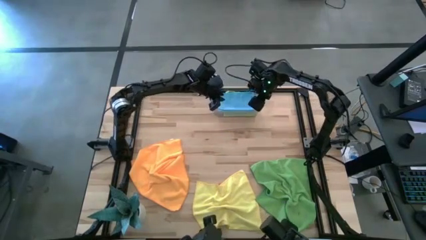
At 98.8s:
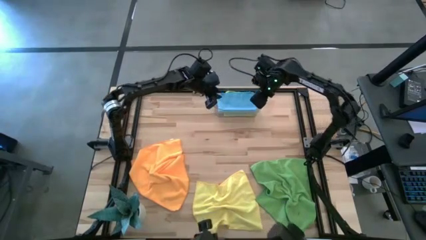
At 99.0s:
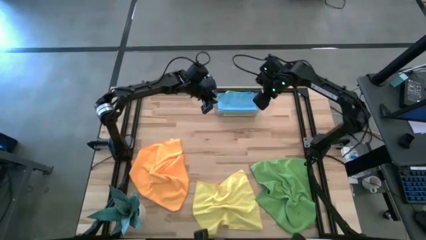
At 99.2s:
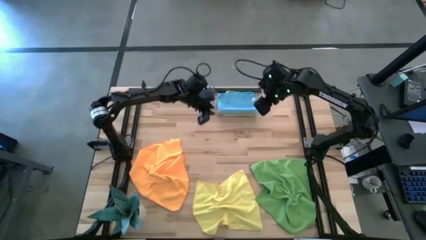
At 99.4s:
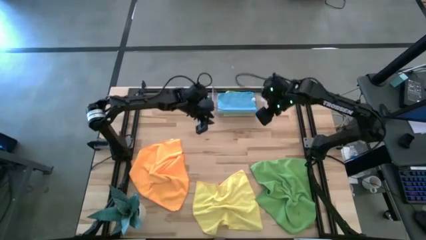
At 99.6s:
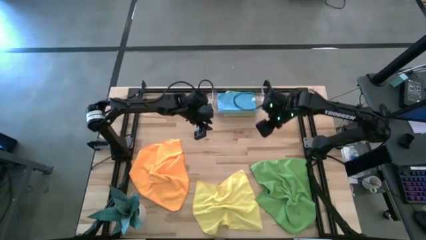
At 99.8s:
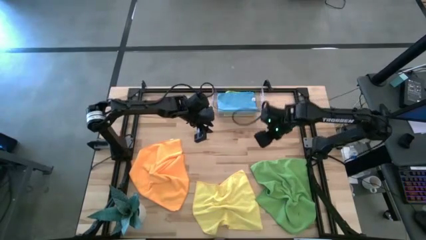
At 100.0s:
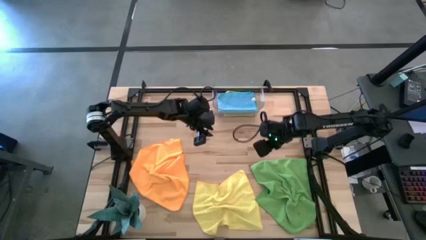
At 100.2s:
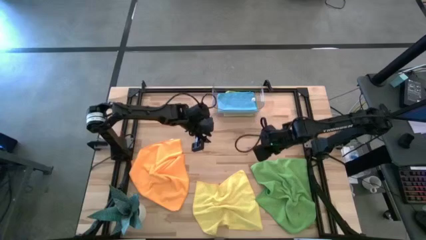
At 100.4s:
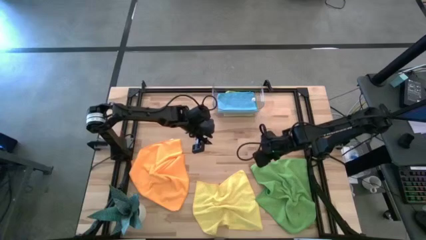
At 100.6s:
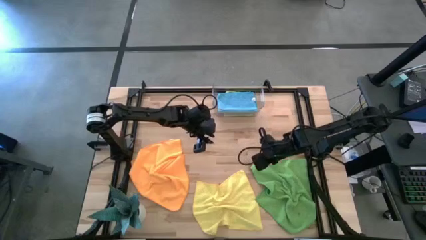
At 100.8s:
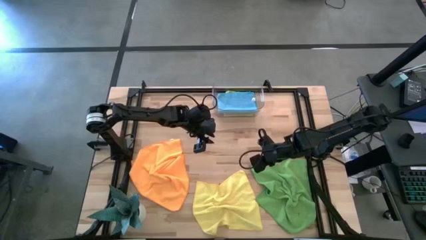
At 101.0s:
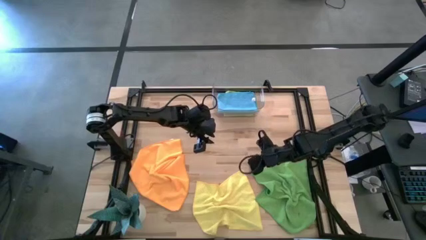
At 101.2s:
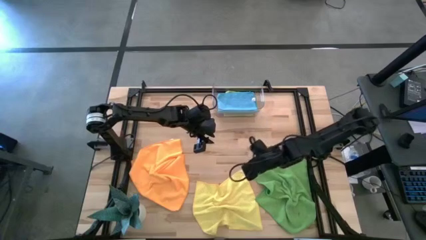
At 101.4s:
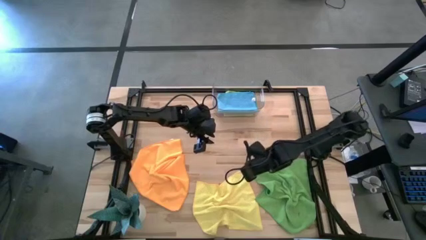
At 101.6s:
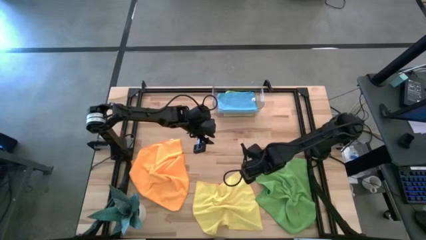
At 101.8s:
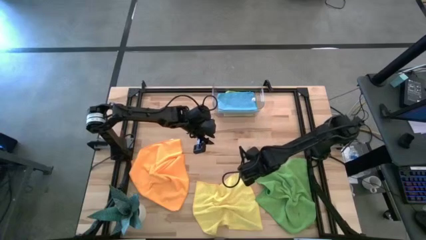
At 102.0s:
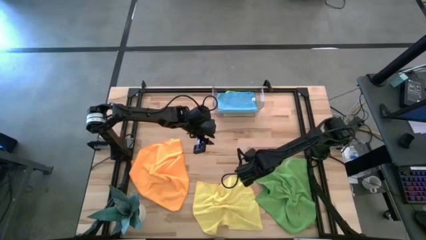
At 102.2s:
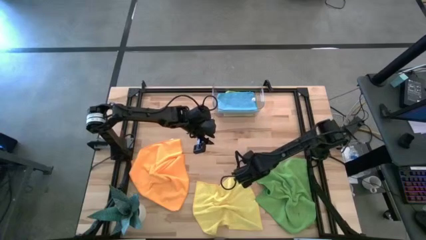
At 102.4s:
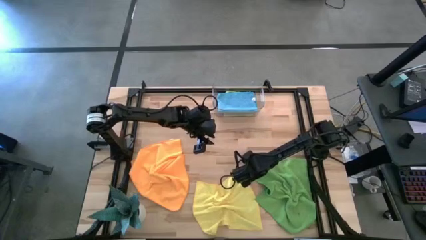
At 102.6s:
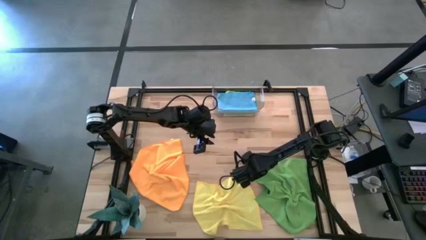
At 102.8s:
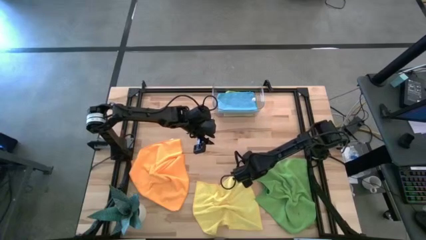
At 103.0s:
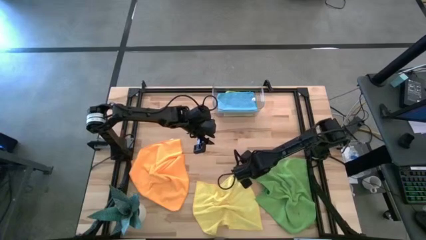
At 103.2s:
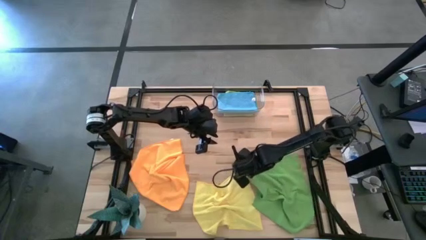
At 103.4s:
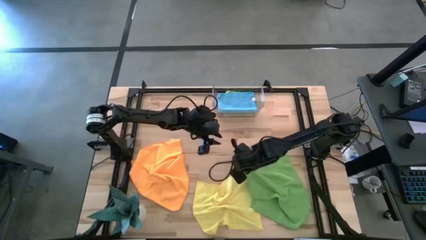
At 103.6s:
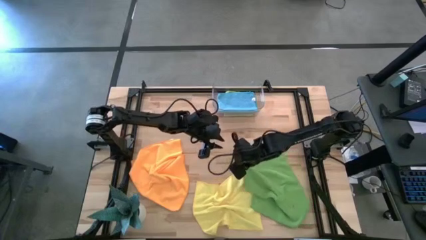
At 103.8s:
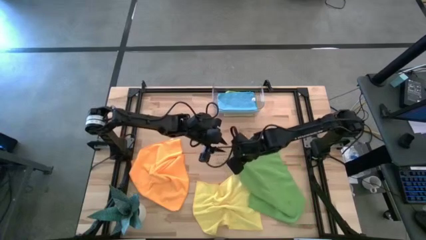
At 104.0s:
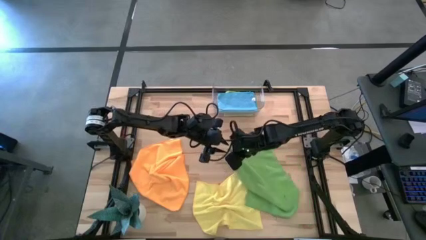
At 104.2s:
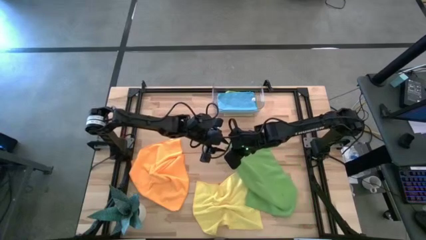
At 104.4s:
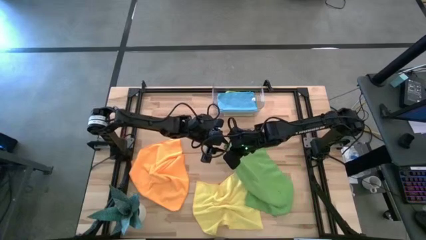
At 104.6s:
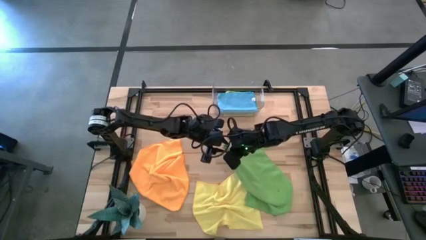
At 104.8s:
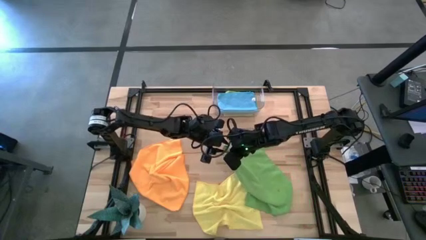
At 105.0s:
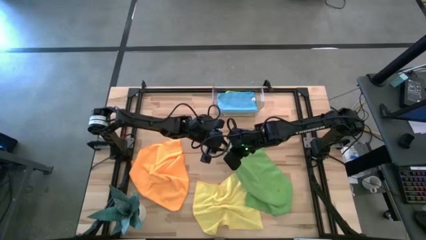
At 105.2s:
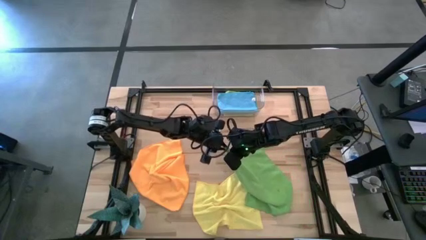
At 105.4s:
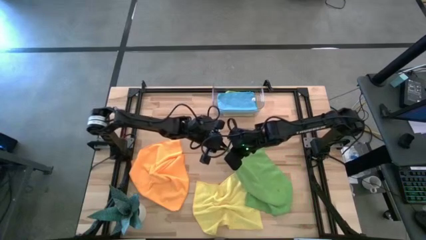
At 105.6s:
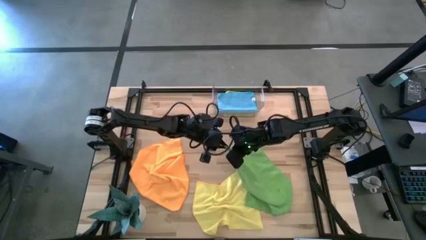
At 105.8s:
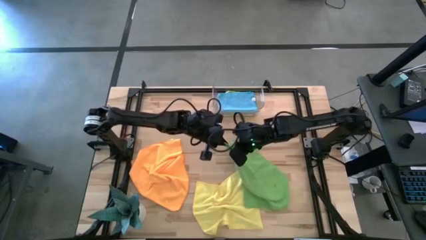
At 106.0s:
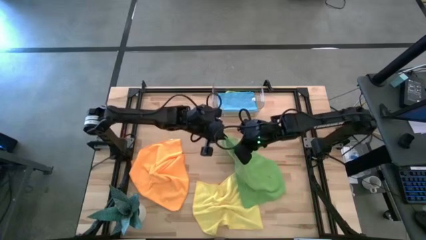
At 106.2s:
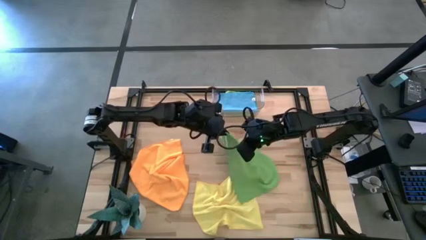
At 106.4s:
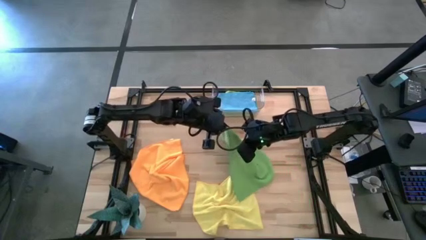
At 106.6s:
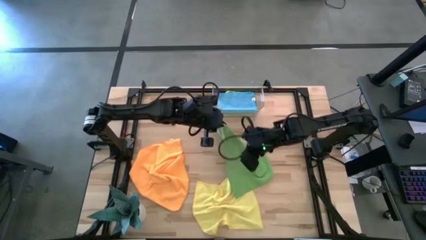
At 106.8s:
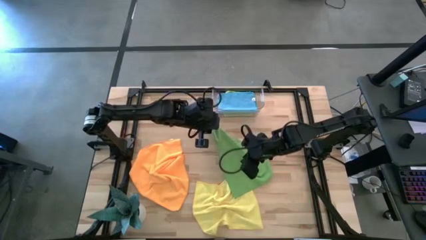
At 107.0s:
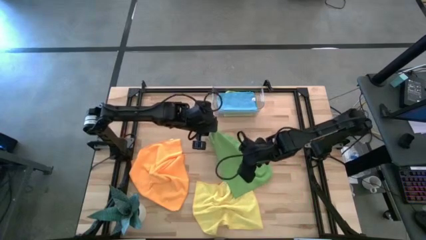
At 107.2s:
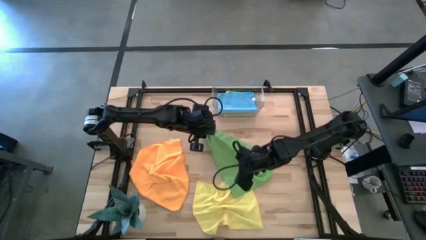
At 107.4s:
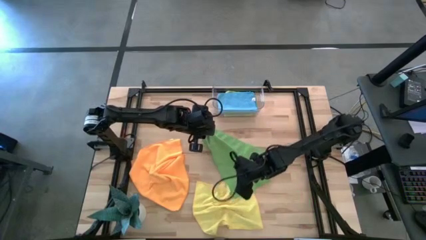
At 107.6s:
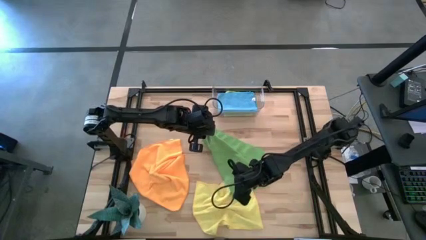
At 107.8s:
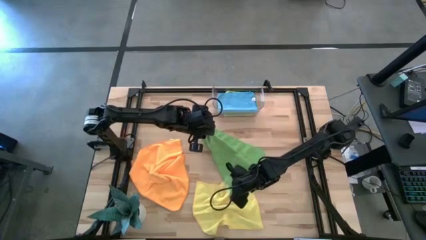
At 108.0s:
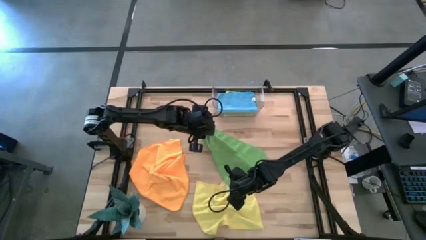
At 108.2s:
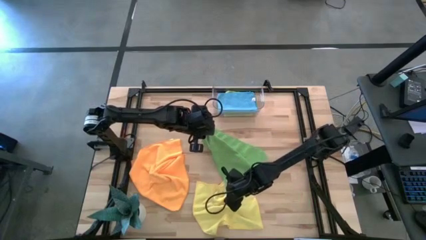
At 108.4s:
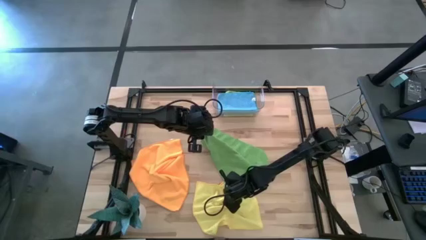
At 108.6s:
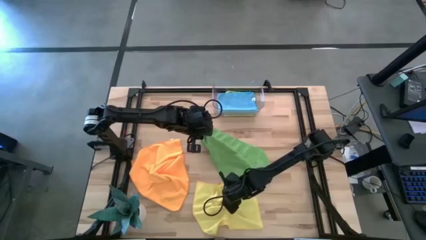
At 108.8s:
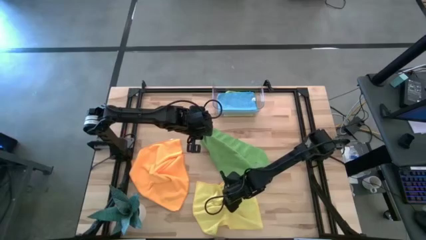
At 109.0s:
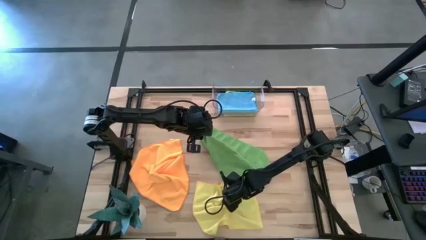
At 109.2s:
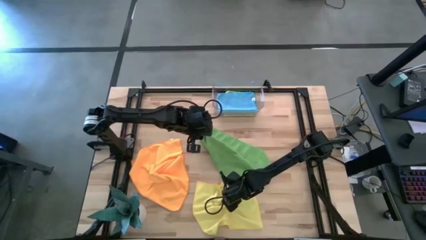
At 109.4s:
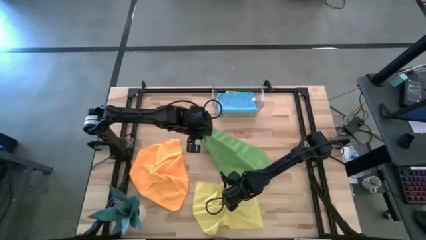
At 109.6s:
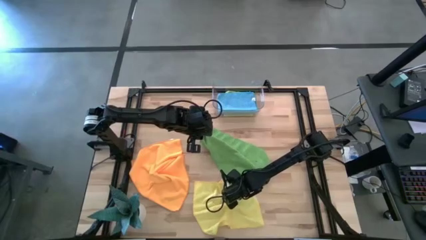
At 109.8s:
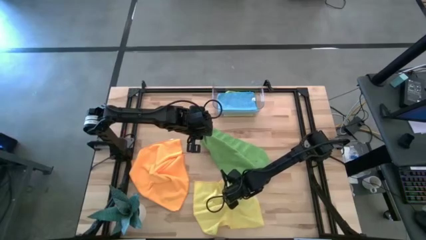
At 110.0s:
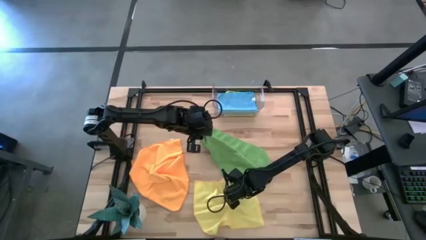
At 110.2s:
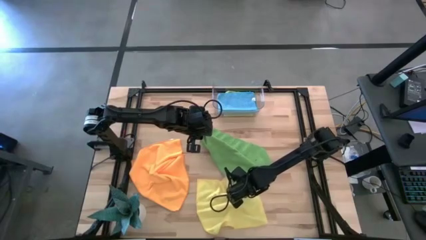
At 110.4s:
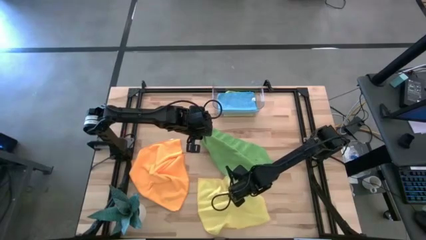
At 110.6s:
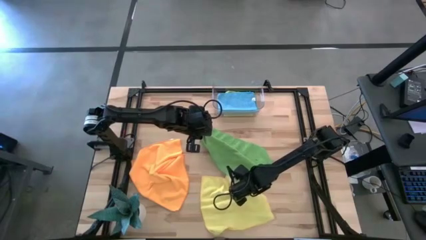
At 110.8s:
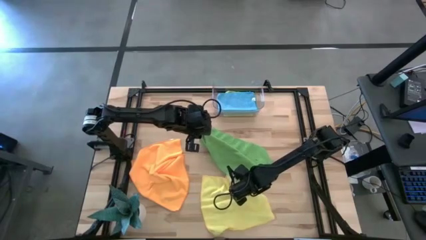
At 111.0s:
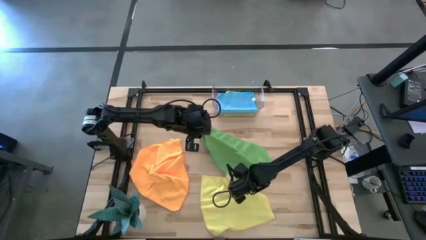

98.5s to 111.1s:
Task: Fold microfiber towels
Fold the green microfiber cloth

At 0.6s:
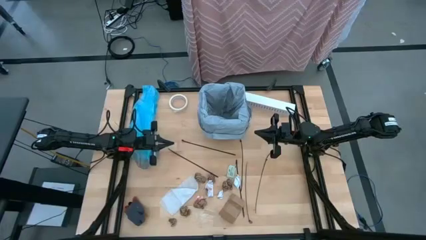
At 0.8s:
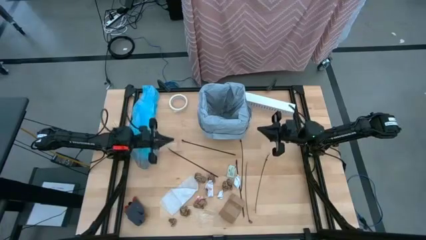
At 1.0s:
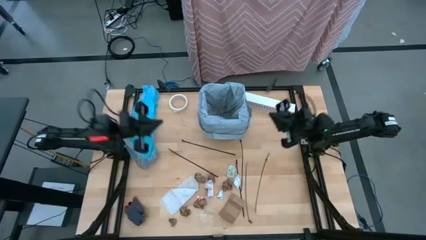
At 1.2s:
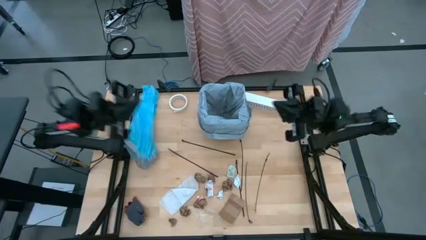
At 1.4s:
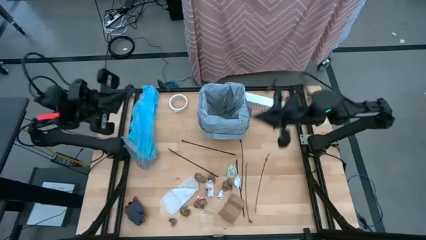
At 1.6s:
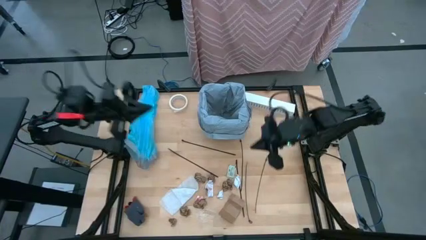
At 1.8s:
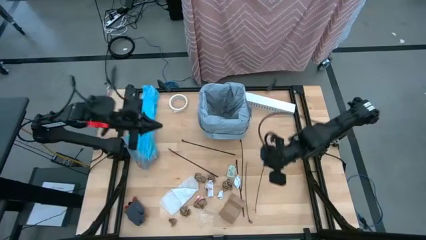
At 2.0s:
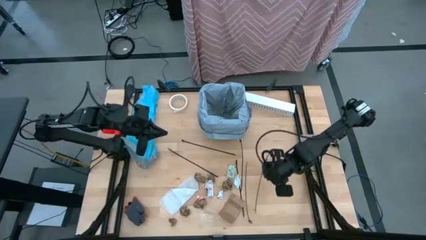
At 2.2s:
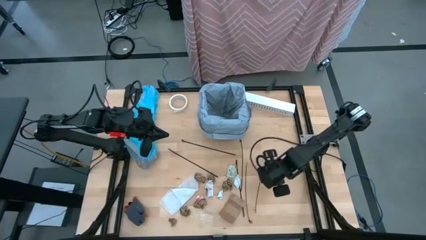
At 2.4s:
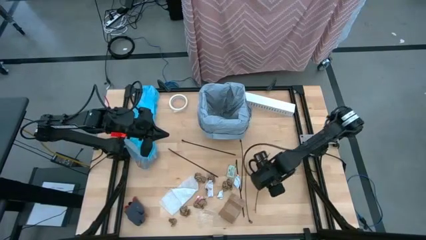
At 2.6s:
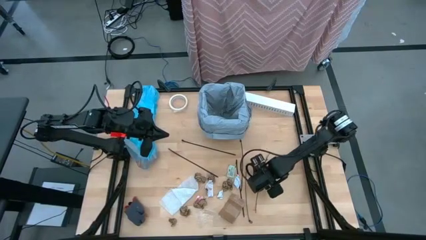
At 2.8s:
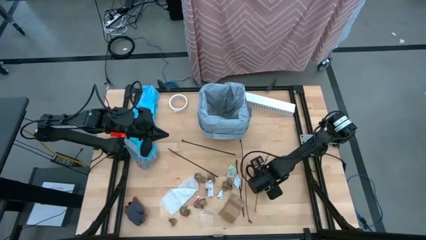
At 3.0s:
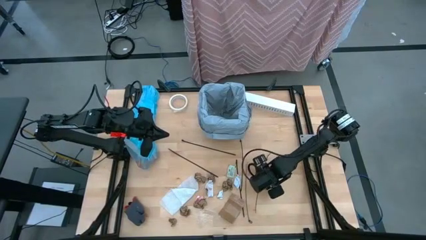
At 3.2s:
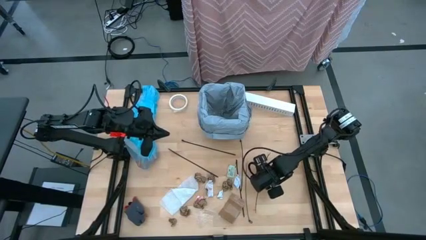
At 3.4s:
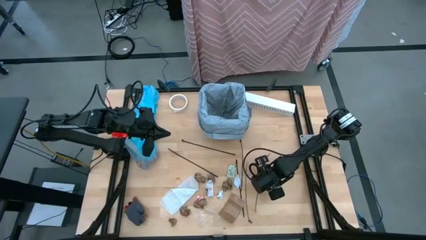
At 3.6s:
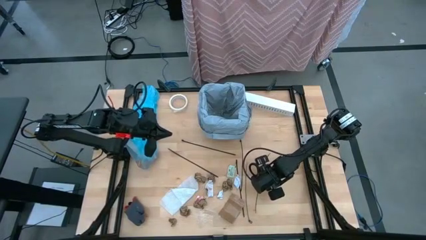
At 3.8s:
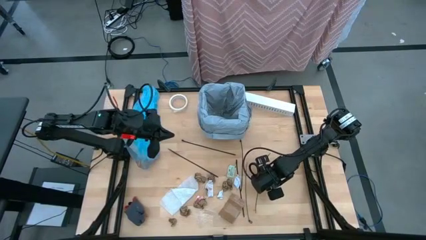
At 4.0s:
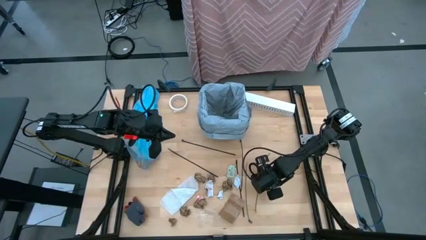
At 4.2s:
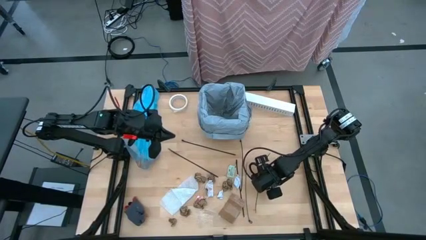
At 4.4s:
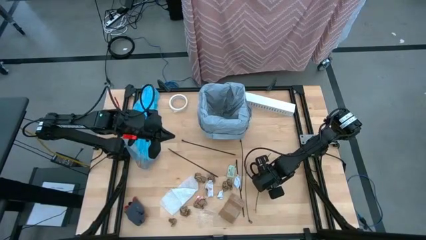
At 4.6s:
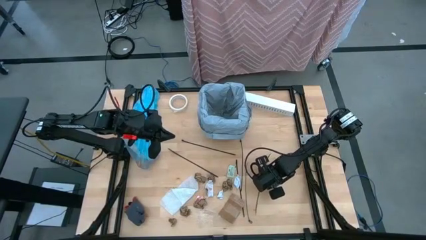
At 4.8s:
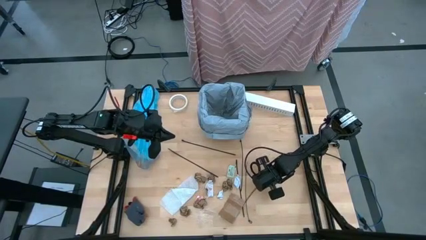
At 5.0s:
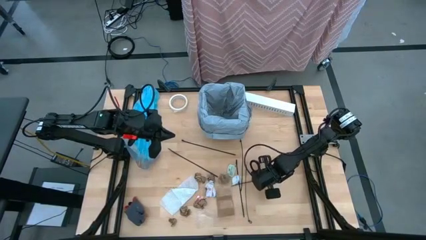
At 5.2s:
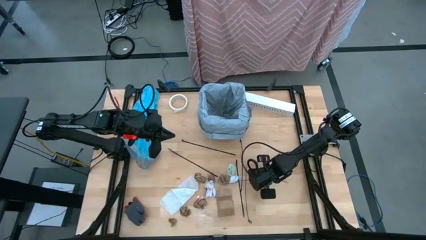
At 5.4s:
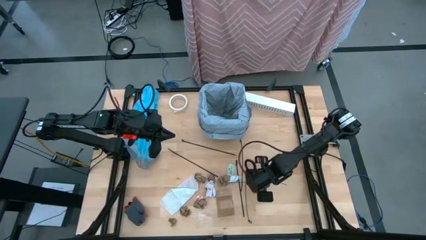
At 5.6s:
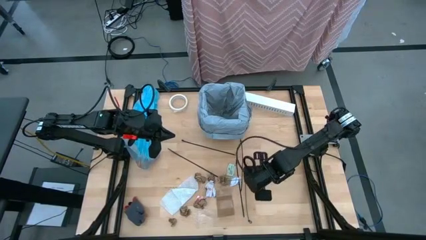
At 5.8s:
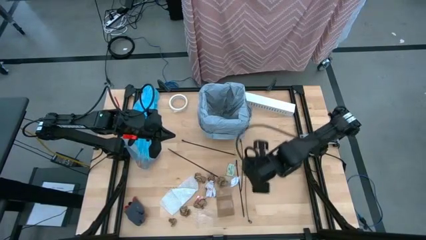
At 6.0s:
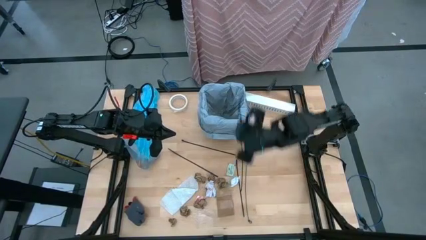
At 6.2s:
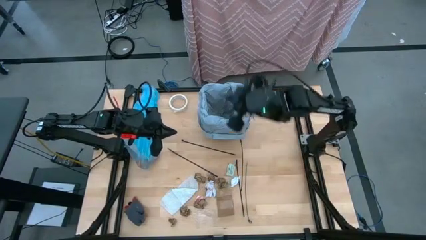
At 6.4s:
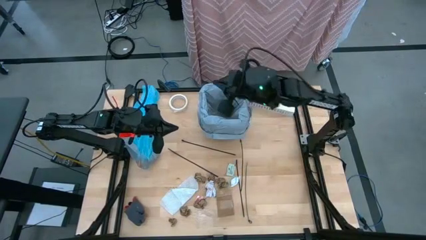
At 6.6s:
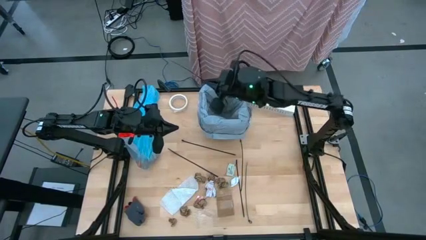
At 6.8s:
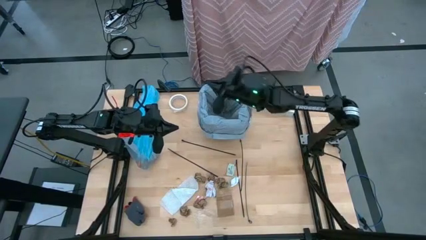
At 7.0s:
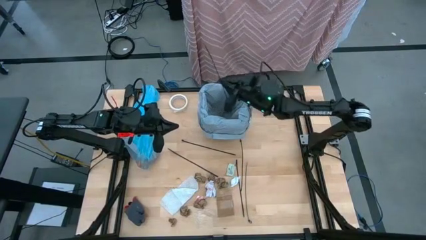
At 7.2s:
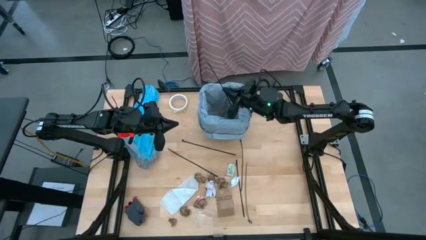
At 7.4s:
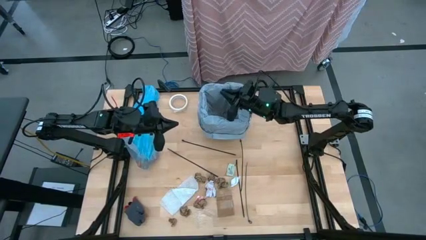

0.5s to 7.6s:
Task: place trash/remove bag and relplace
Put the zip tie into the trash bin
